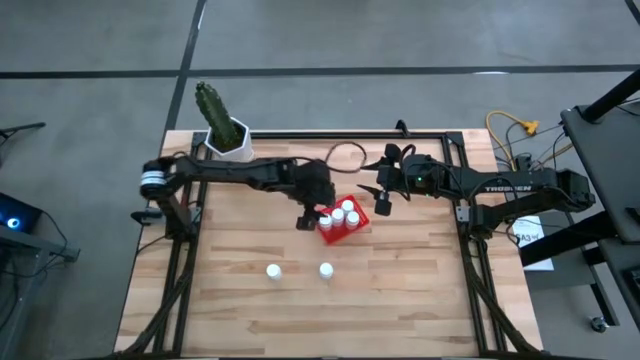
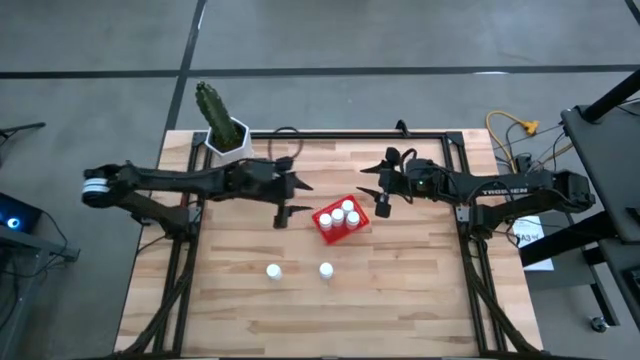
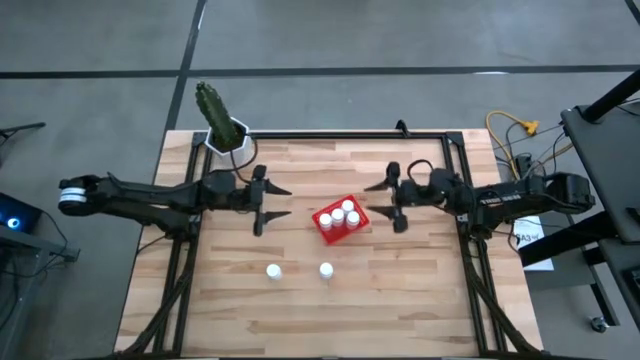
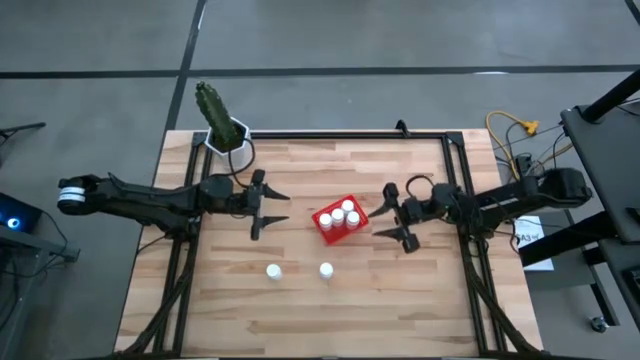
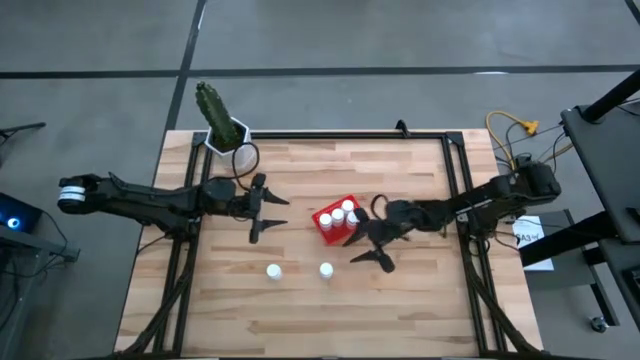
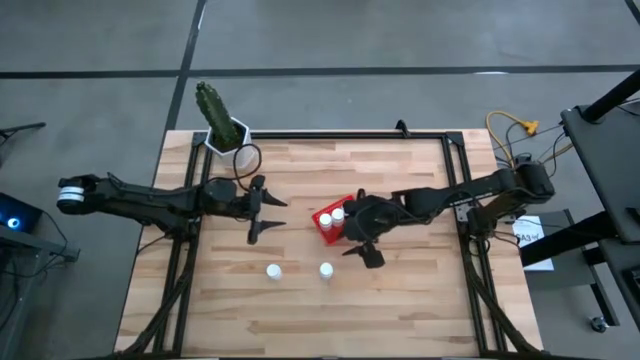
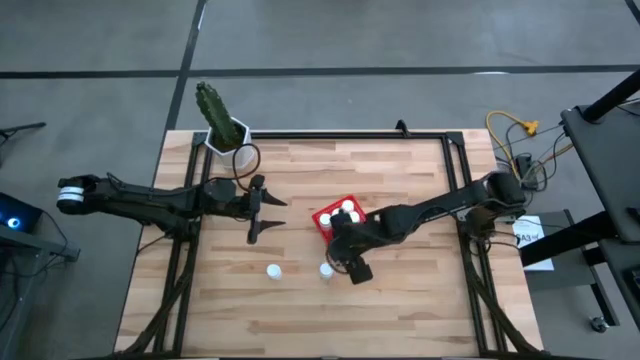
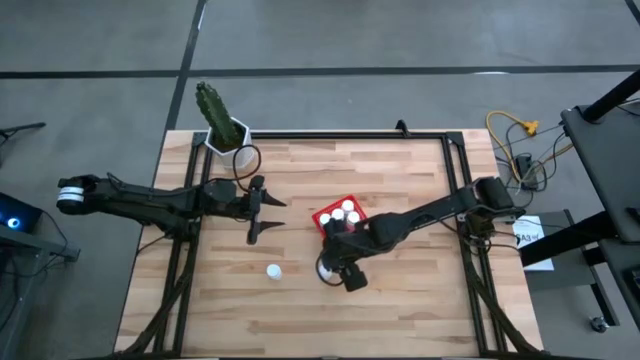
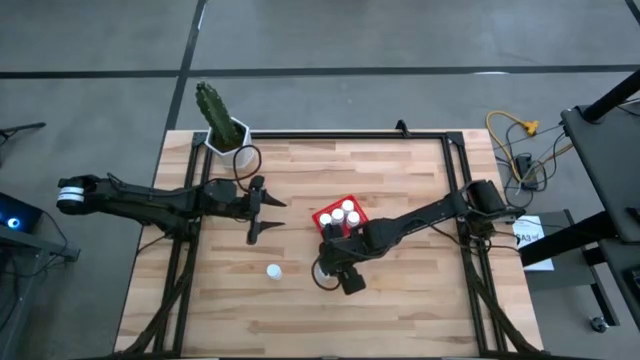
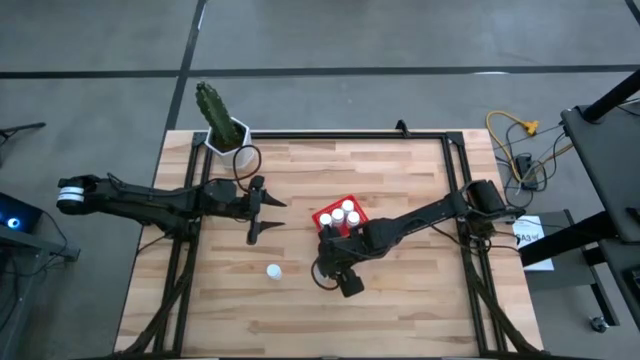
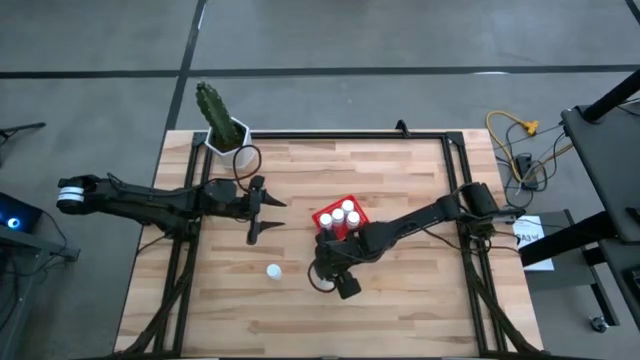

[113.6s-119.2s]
Task: Pick and place pill bottles into a basket
Put the white pill bottle into the red bin

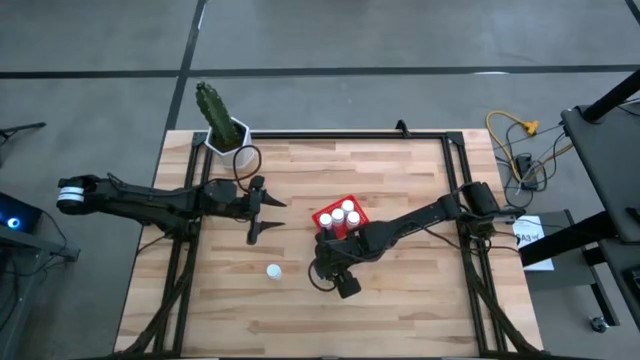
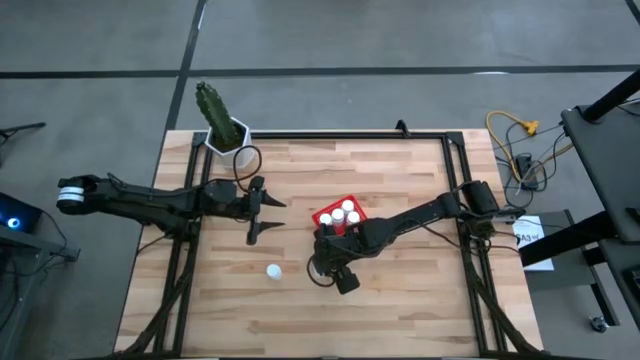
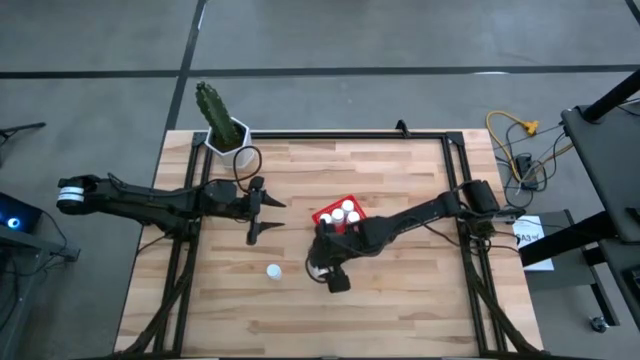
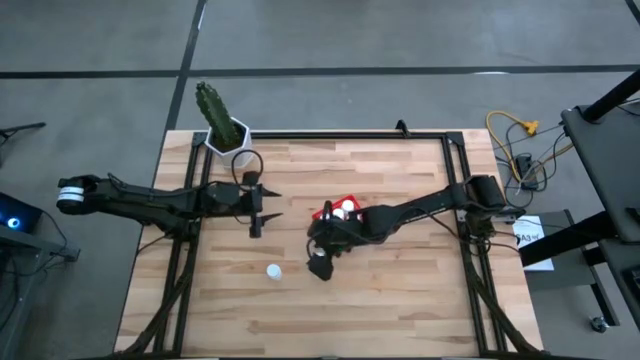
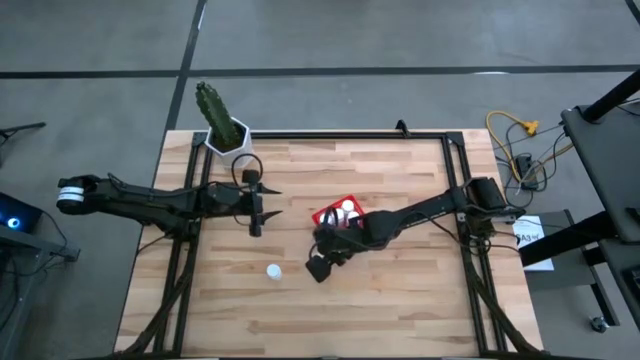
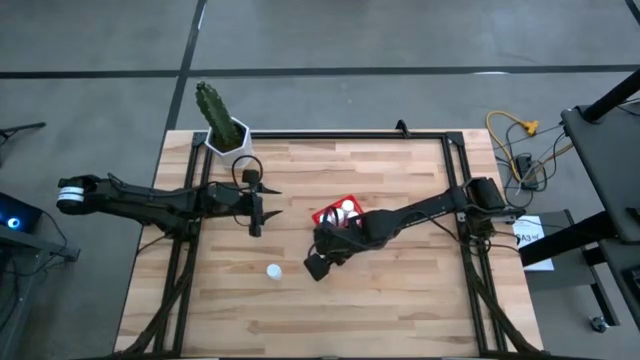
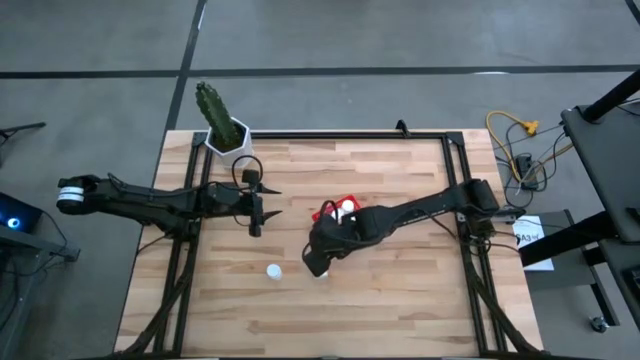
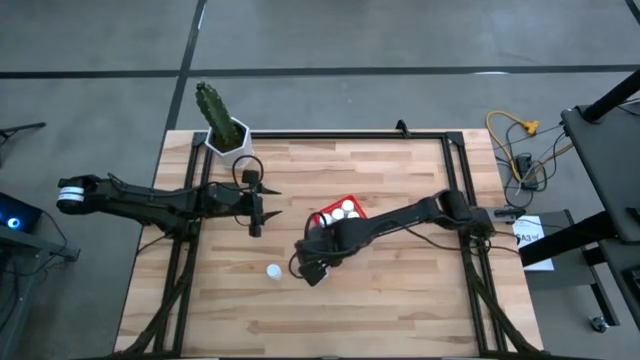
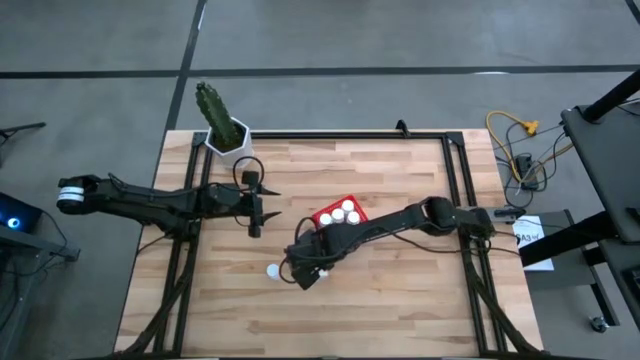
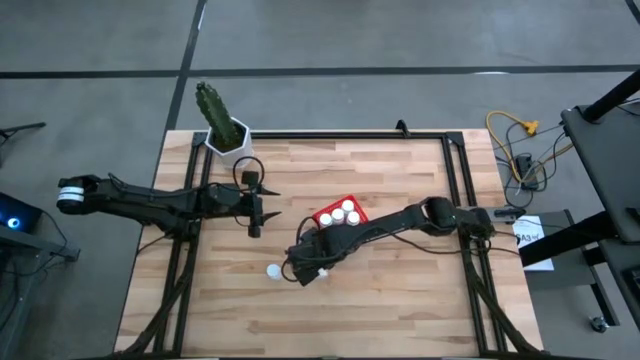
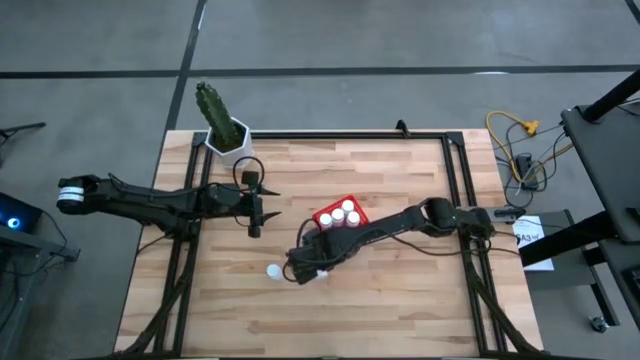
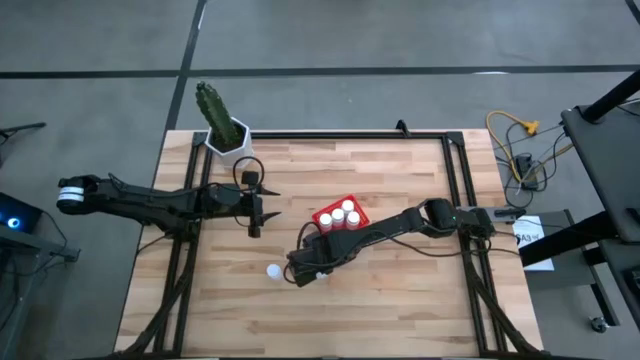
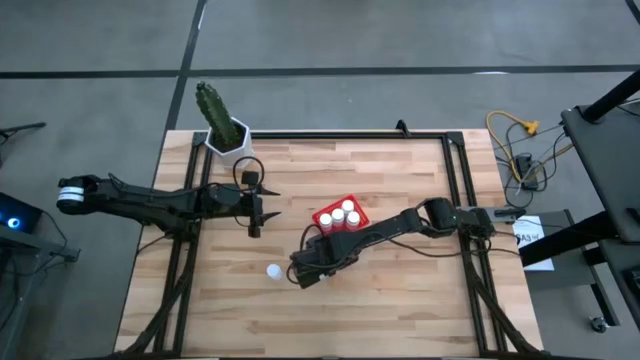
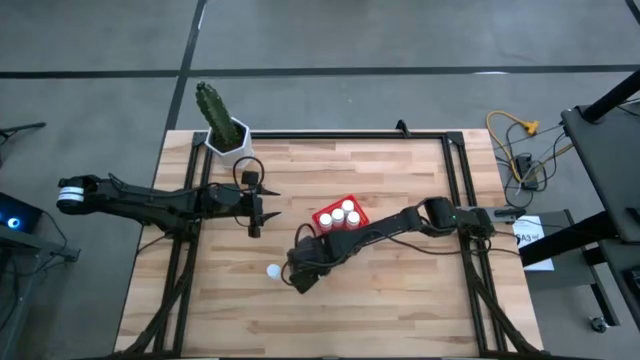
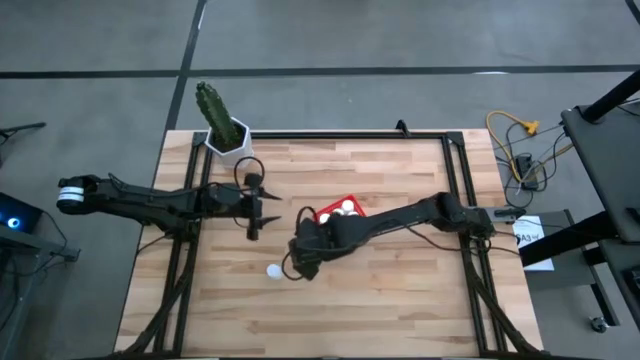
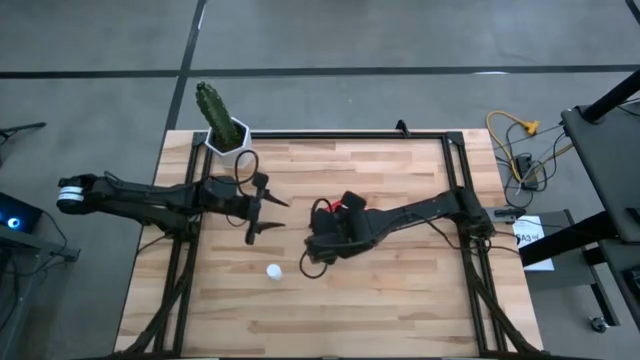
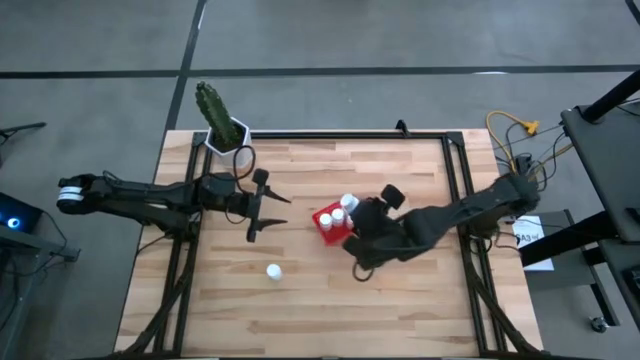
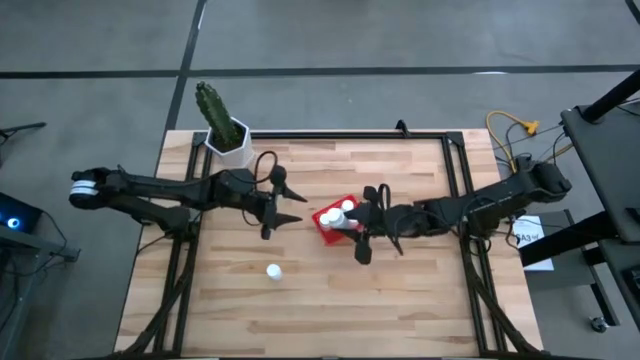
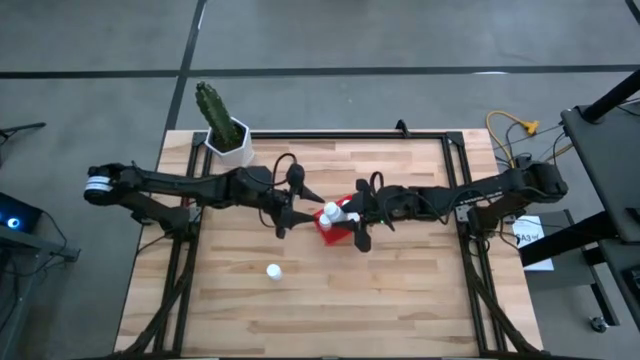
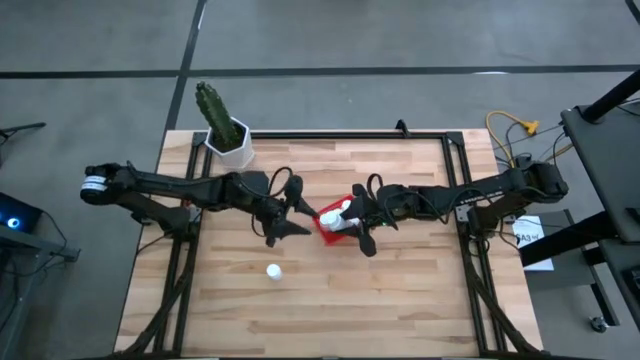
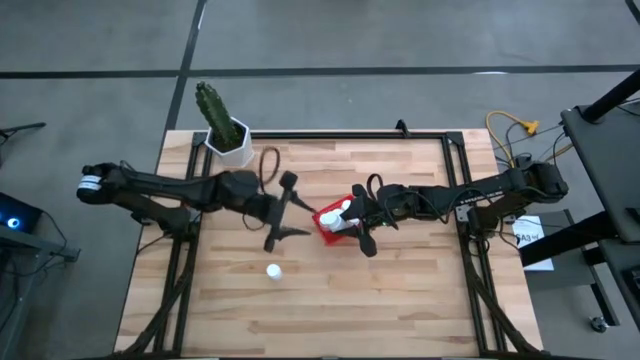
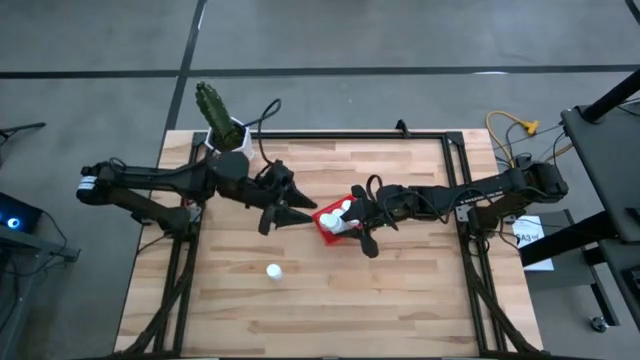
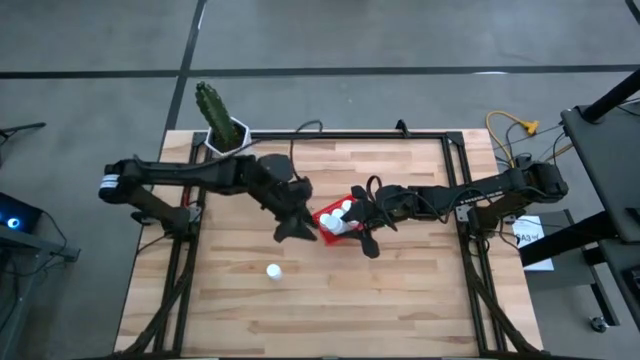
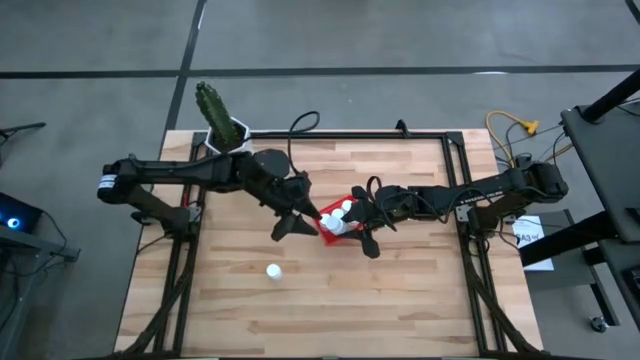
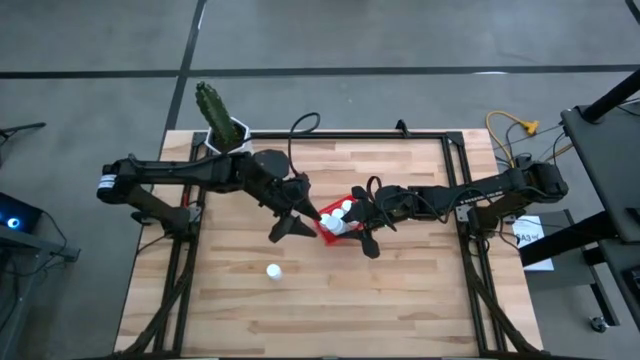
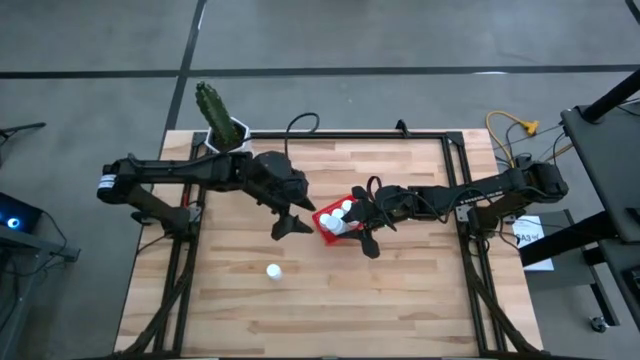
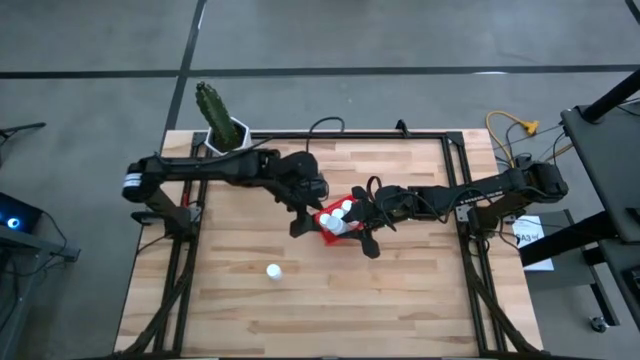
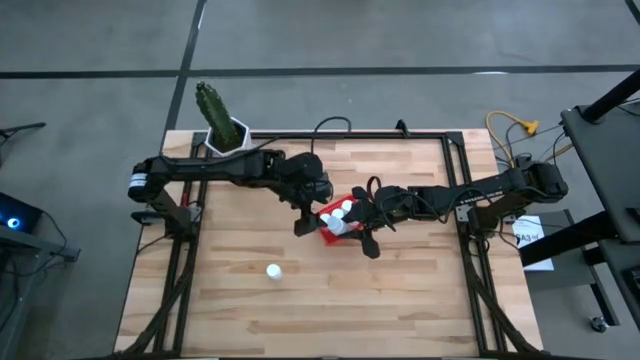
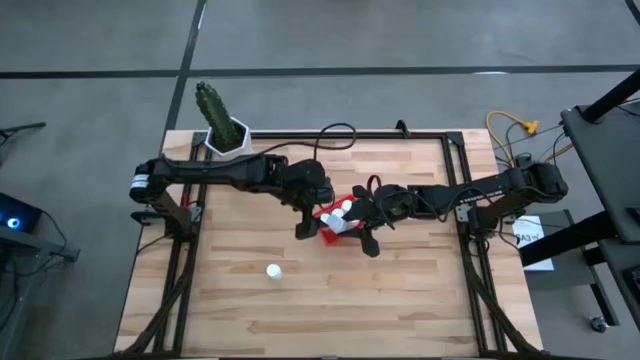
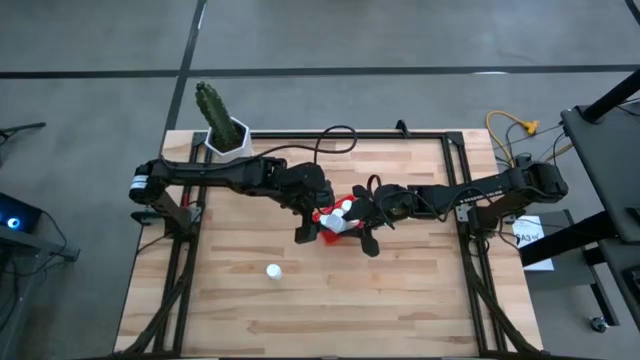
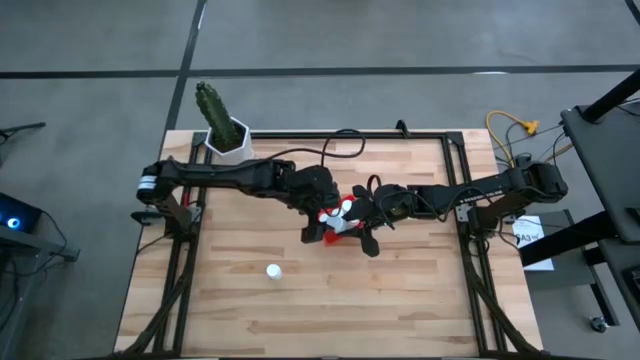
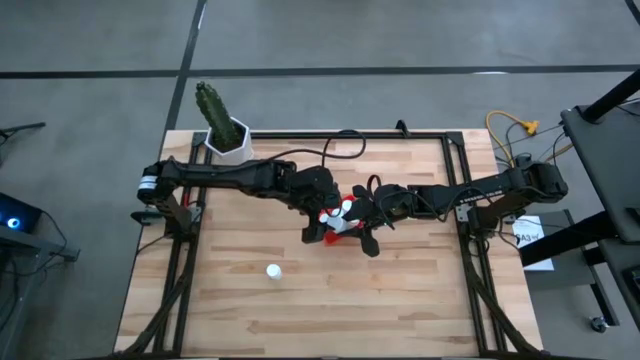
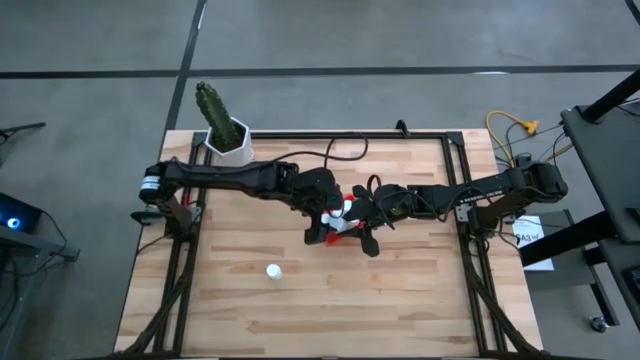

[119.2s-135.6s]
Put the white pill bottle into the red bin
